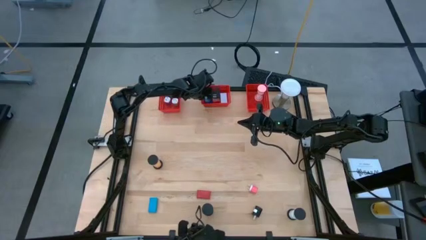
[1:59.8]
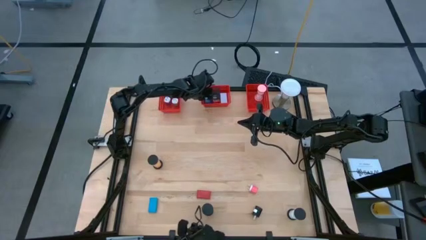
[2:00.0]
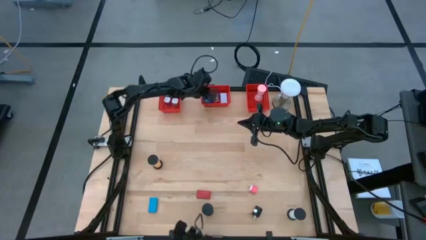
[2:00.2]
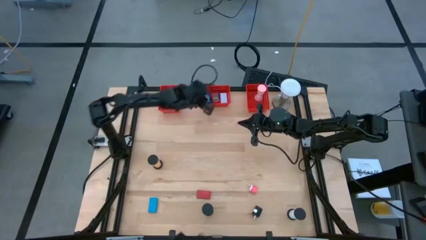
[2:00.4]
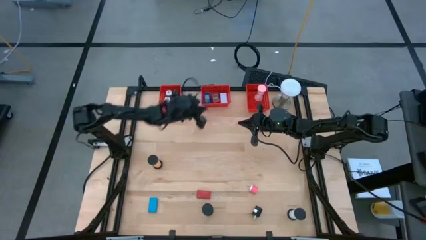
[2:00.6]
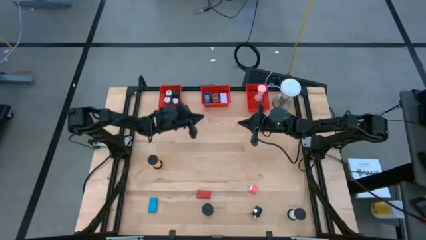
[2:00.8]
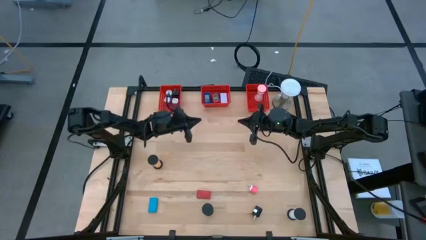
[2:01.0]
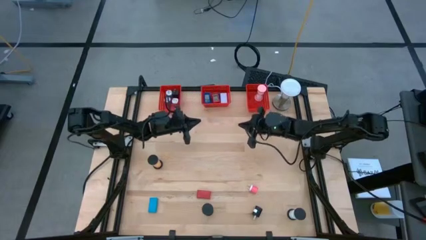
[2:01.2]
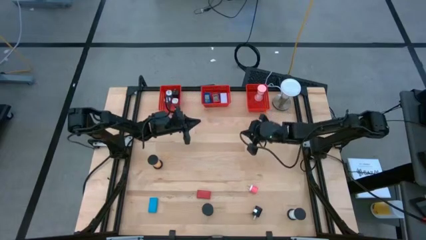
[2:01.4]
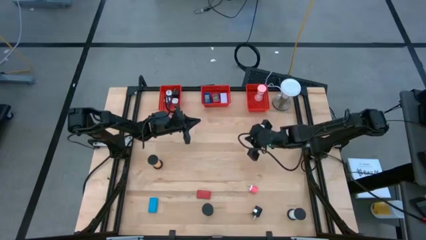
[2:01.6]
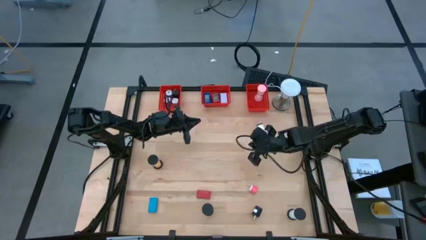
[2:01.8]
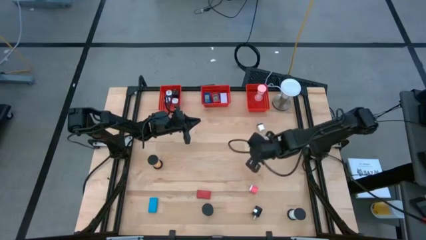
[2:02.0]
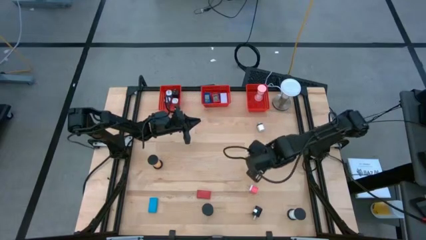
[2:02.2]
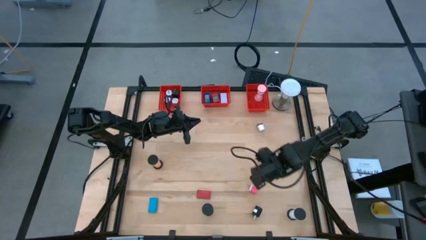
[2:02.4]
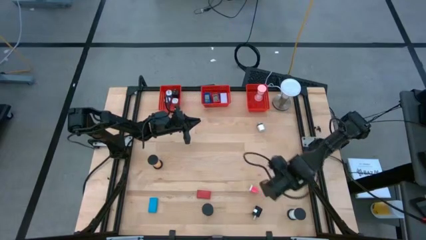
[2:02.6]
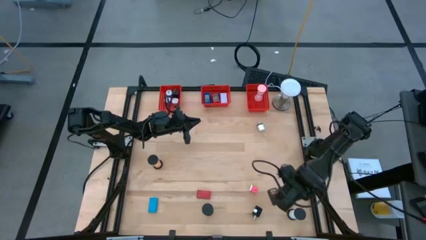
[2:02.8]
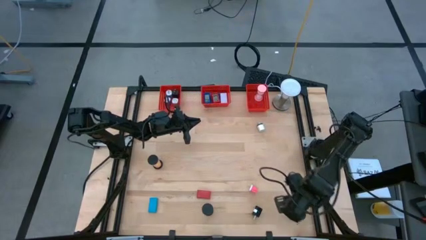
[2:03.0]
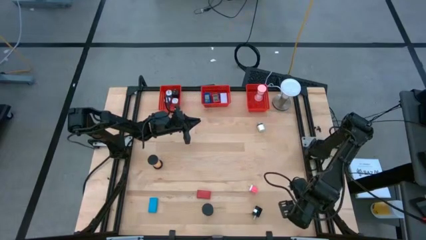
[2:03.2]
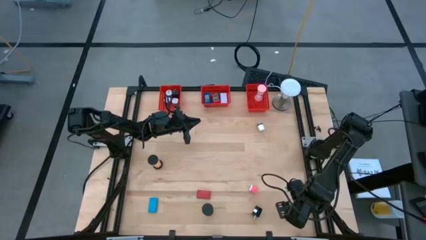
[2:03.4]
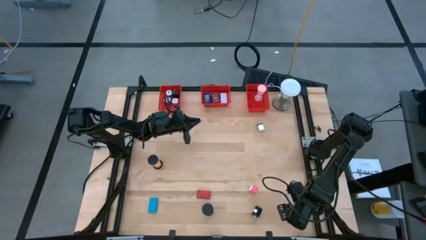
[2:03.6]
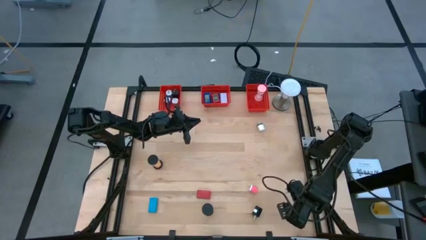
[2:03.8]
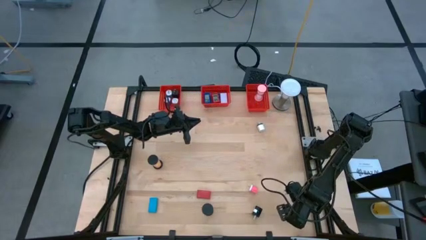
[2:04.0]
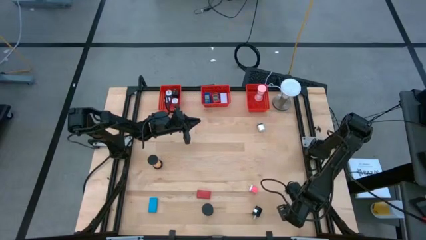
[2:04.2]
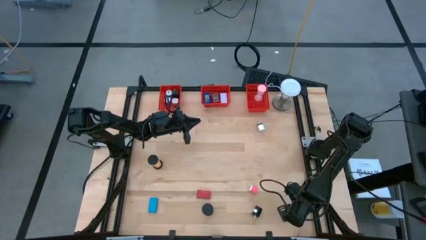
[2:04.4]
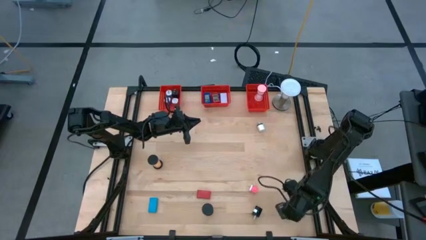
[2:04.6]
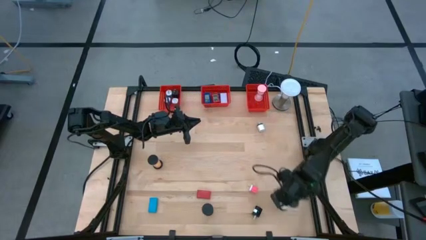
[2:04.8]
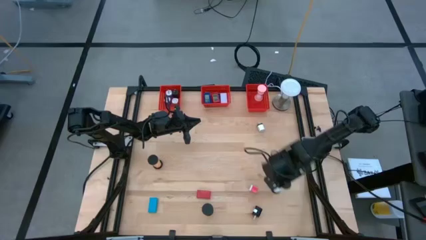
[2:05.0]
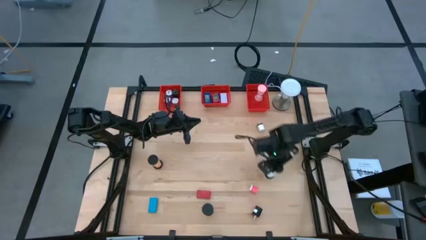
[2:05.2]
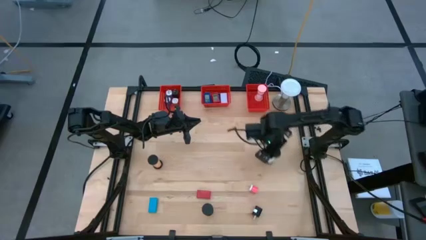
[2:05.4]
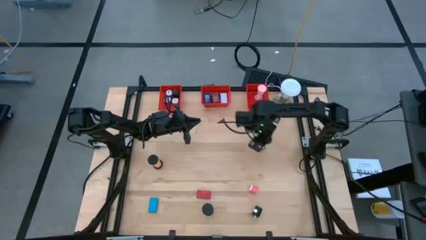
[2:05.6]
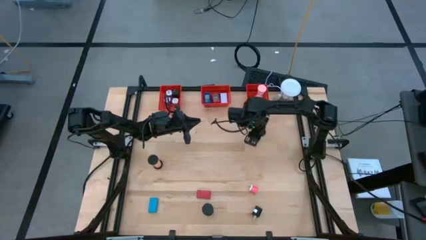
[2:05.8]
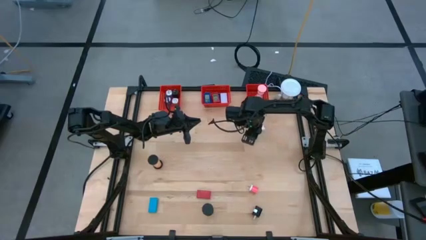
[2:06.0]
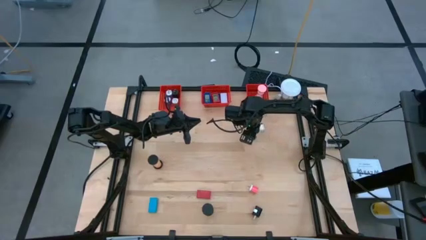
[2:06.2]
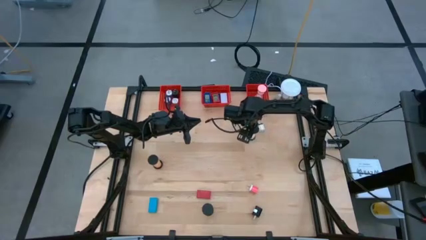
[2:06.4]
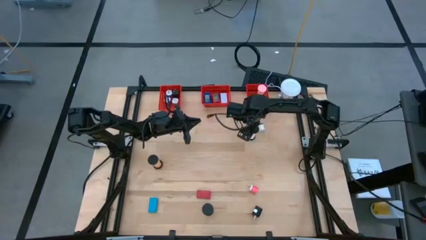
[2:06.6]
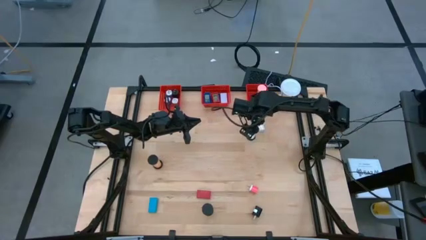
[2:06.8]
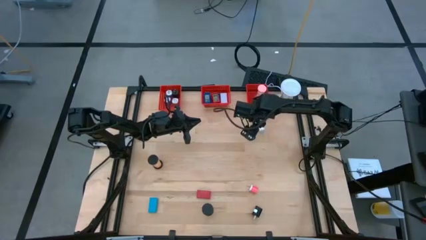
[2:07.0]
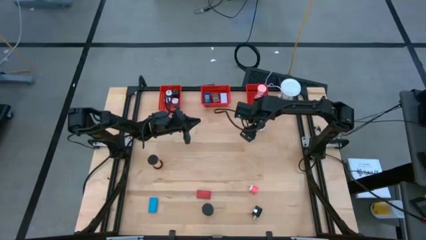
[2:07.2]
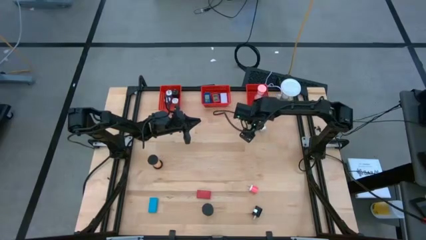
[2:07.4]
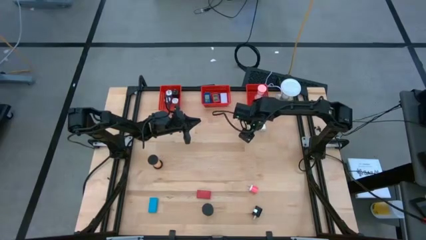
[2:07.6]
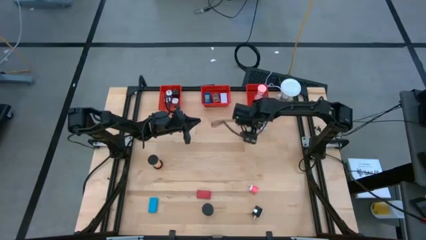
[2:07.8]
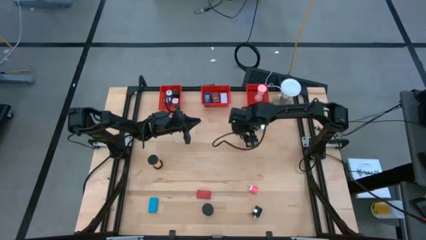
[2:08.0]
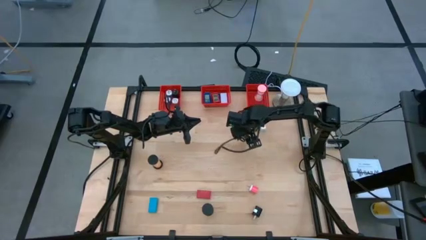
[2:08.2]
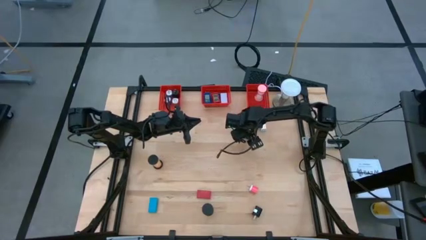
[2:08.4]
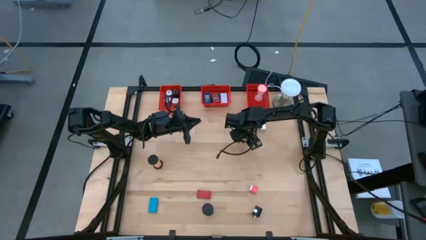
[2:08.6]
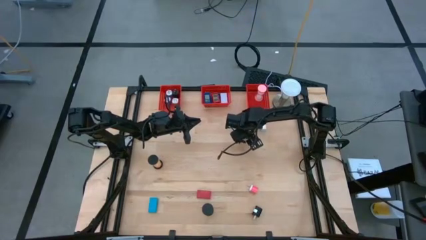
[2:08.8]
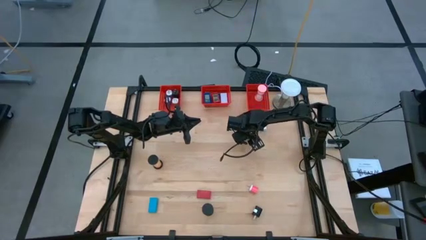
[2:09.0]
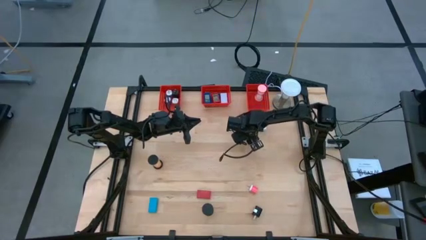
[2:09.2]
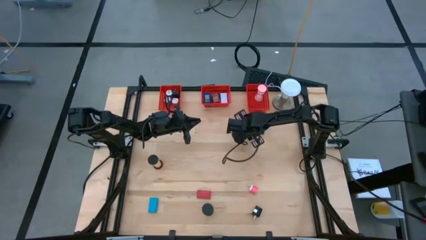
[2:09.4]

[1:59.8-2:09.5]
Task: Pick & Place Office items
Put the white hour glass into the right red bin

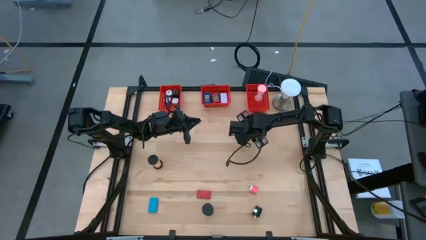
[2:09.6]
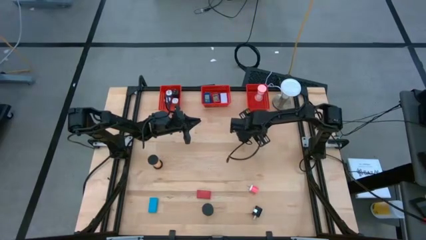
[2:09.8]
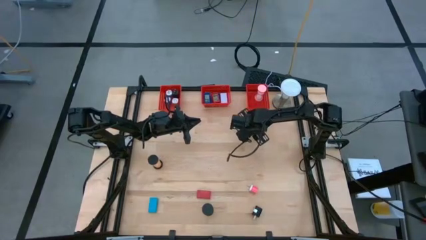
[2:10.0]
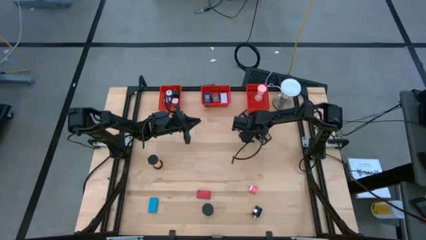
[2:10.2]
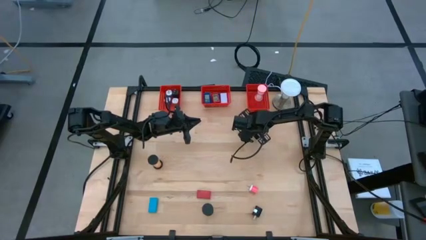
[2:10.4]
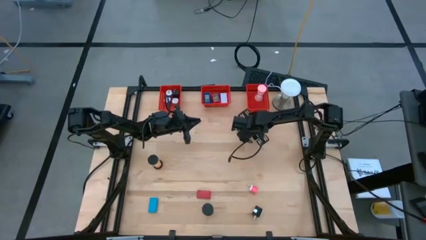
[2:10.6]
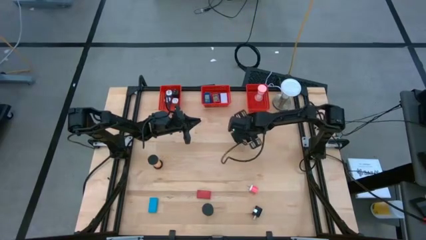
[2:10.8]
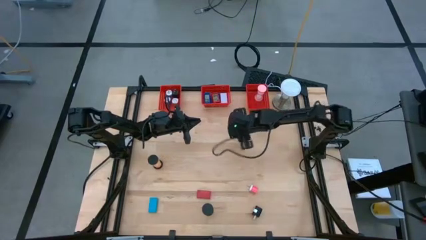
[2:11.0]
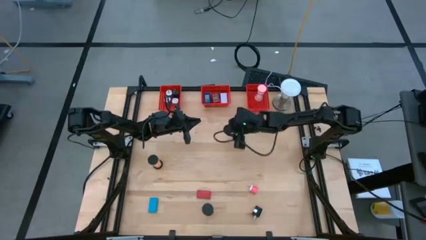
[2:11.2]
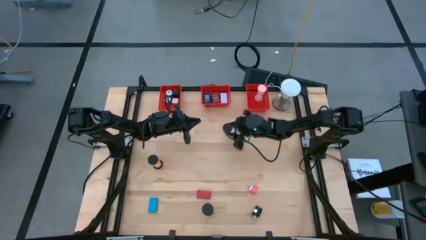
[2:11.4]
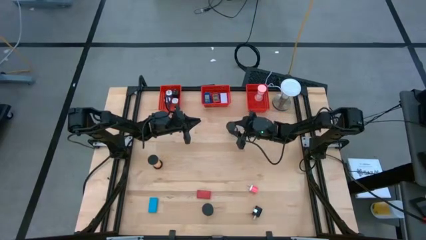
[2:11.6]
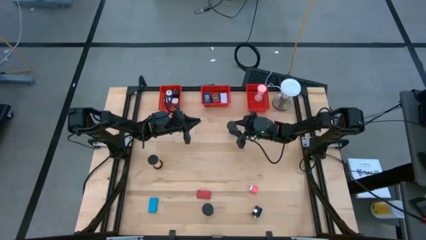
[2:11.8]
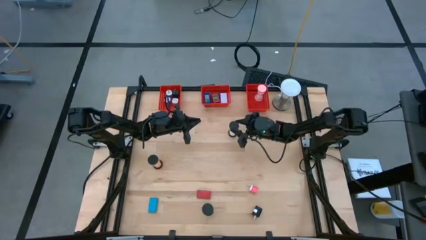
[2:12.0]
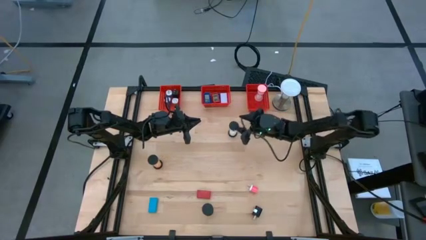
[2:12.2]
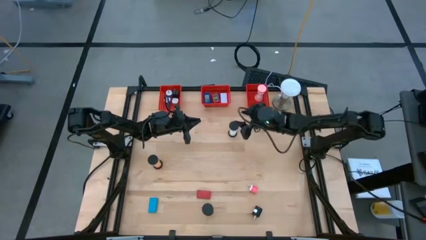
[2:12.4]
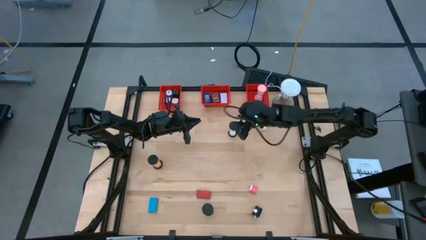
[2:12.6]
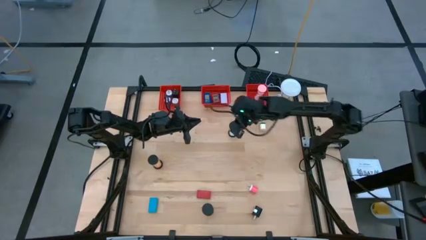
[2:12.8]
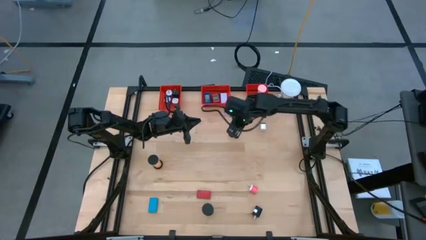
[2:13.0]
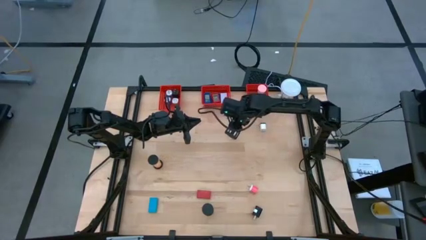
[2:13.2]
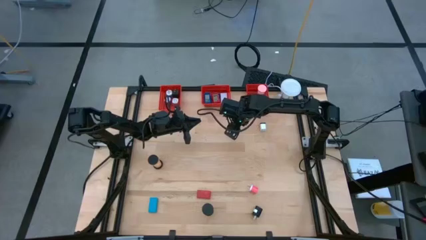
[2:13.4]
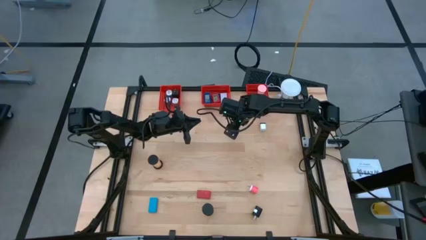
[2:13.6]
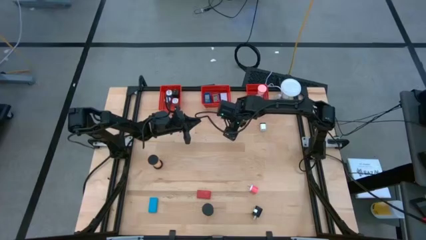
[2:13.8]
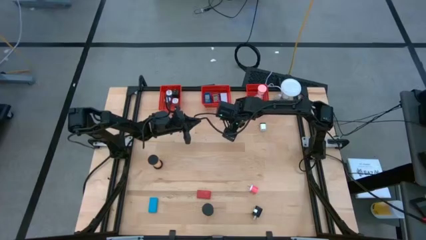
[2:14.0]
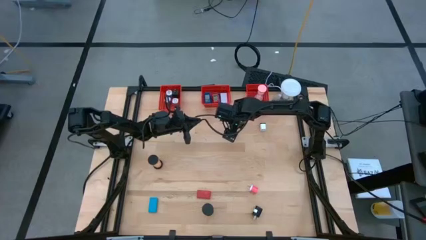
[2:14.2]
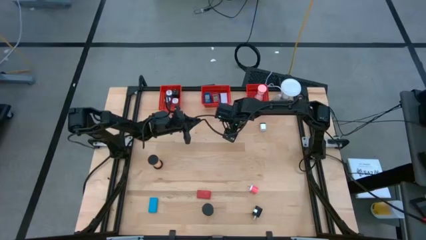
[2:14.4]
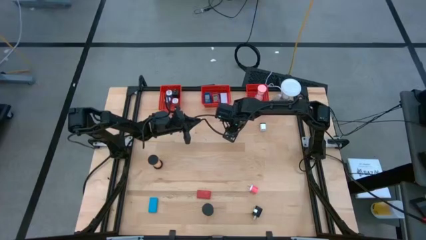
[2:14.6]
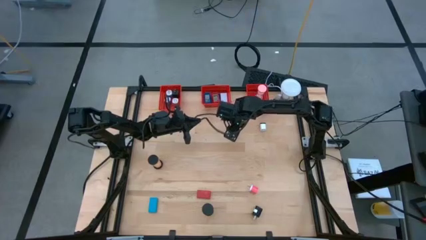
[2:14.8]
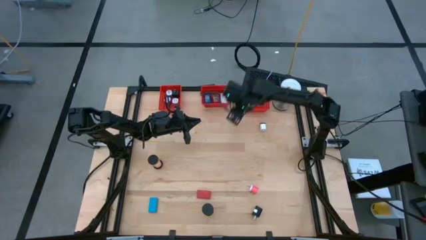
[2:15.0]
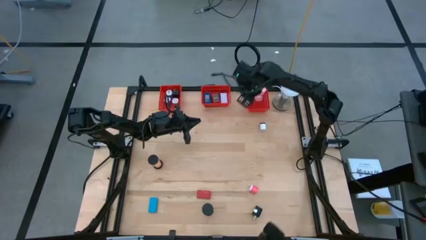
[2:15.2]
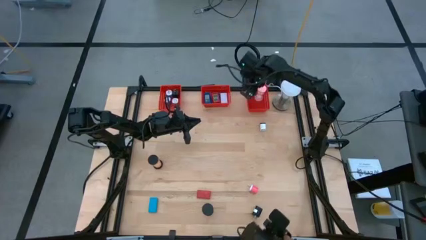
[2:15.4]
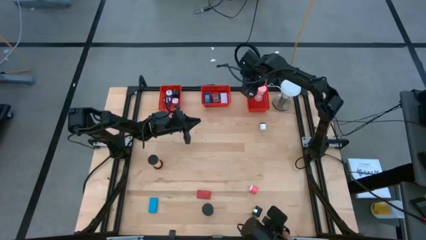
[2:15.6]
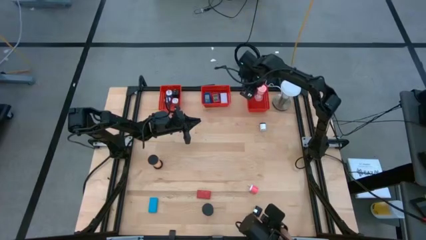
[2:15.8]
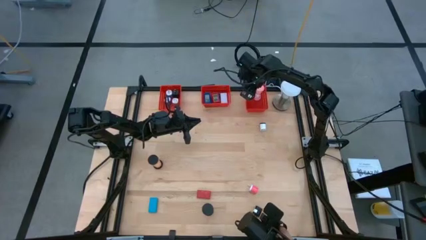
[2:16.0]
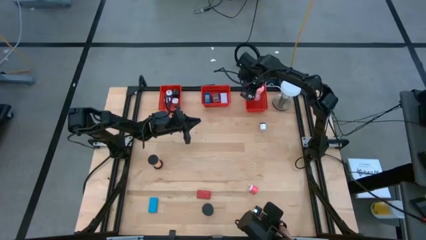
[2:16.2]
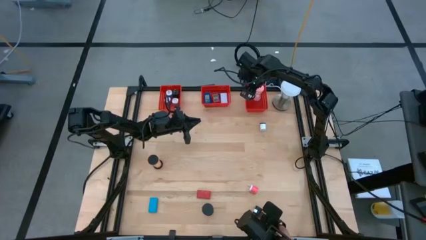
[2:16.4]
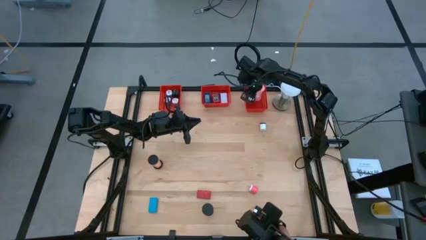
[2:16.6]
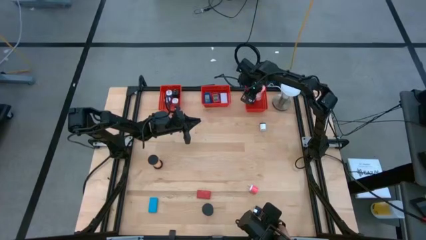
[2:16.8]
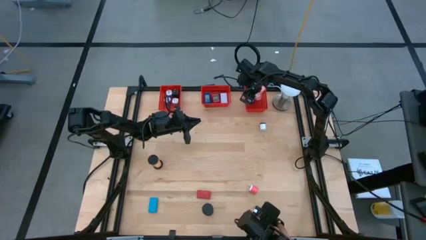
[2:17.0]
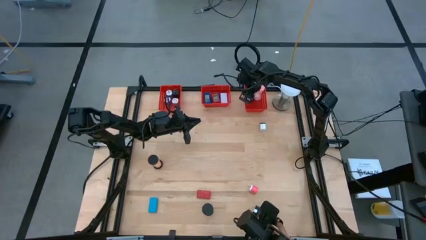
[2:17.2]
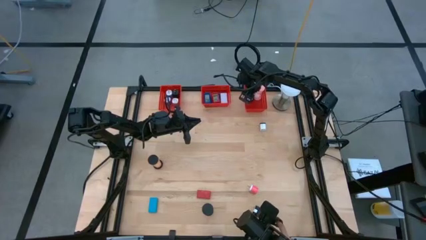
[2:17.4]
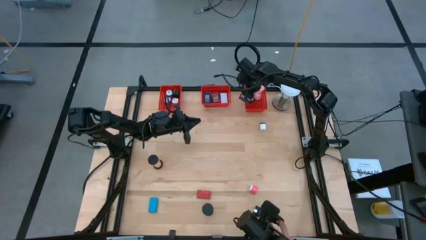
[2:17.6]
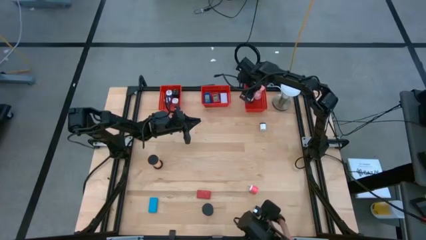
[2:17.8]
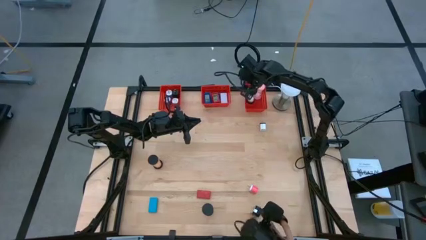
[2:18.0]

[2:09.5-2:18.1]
Put the white hour glass into the right red bin
